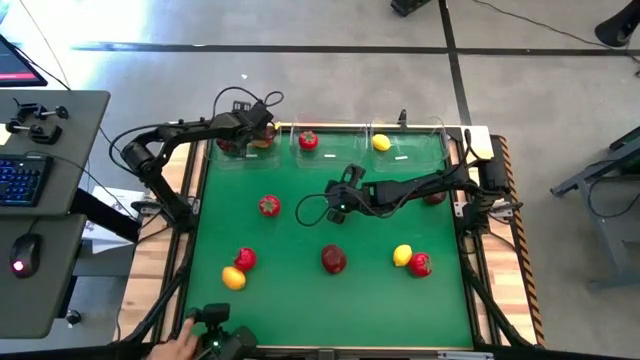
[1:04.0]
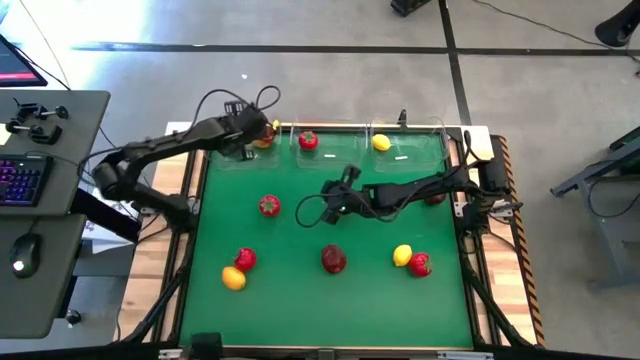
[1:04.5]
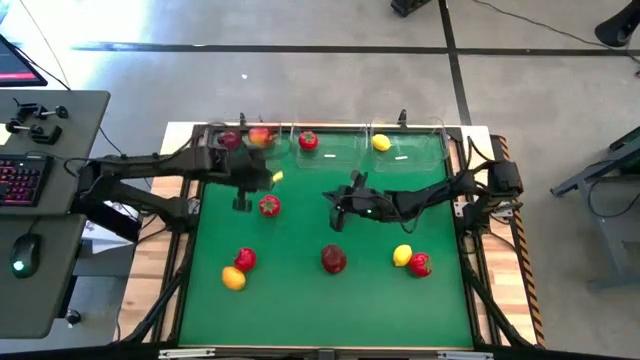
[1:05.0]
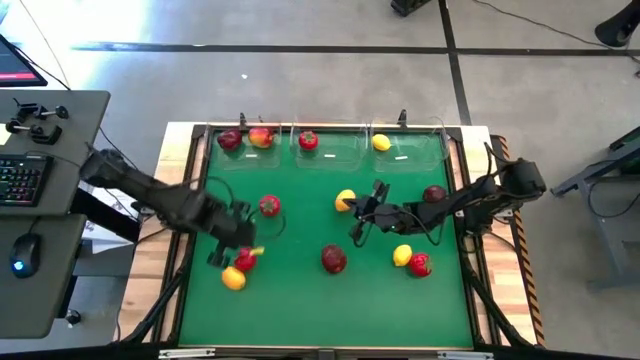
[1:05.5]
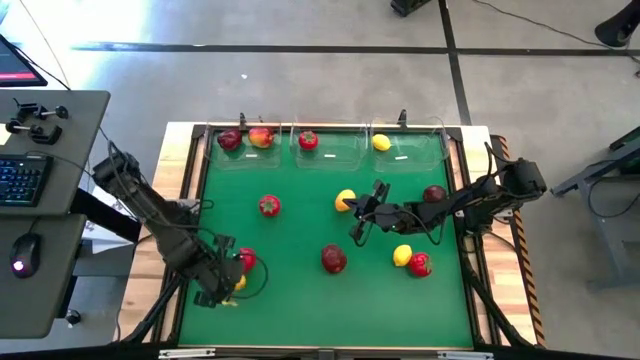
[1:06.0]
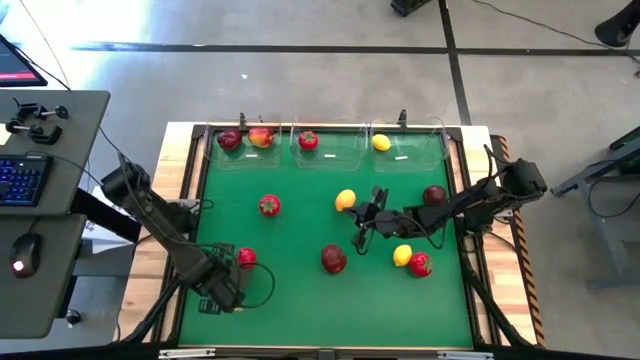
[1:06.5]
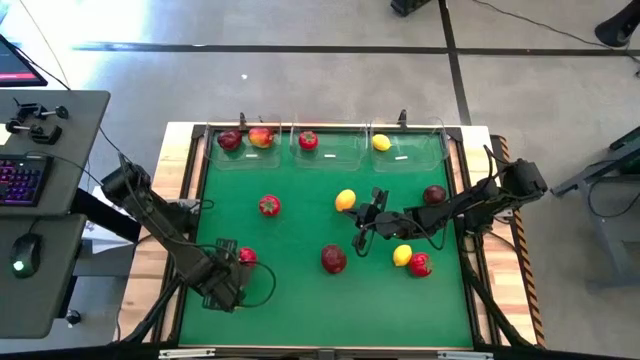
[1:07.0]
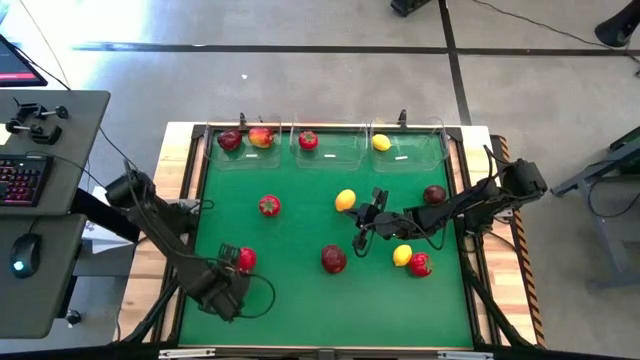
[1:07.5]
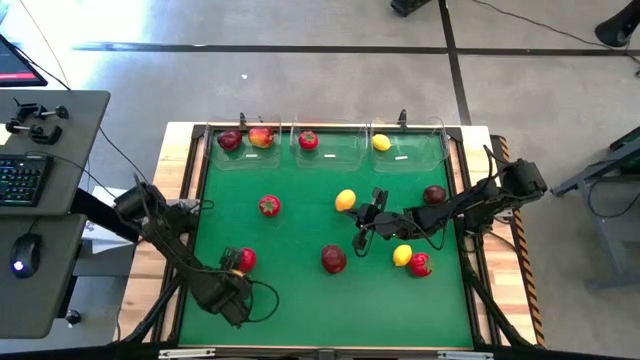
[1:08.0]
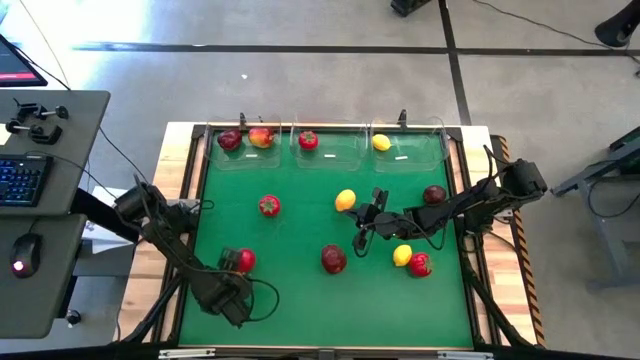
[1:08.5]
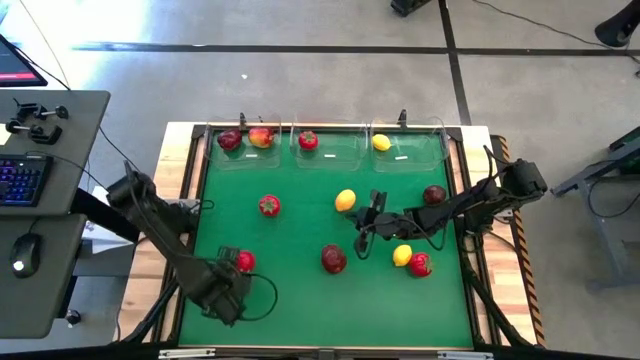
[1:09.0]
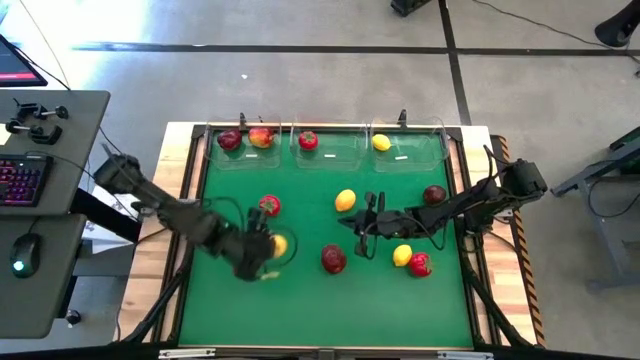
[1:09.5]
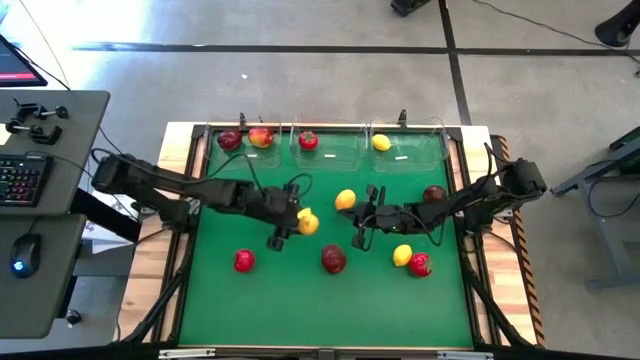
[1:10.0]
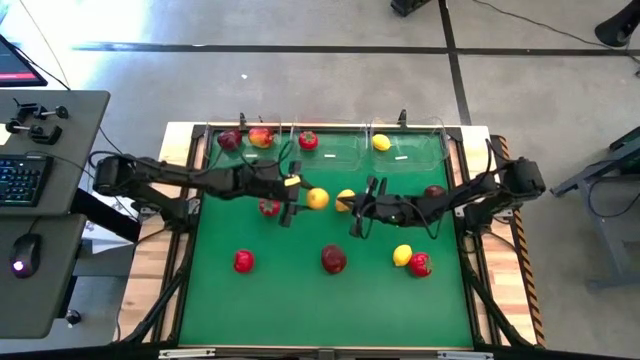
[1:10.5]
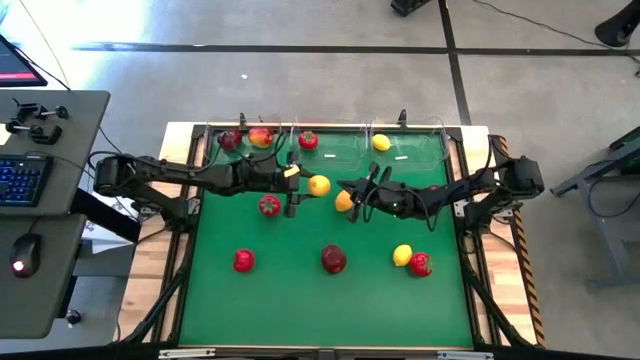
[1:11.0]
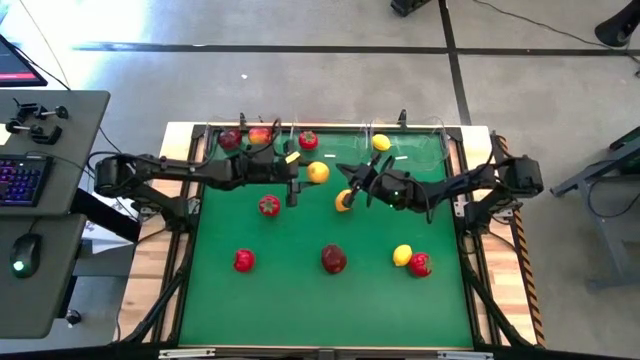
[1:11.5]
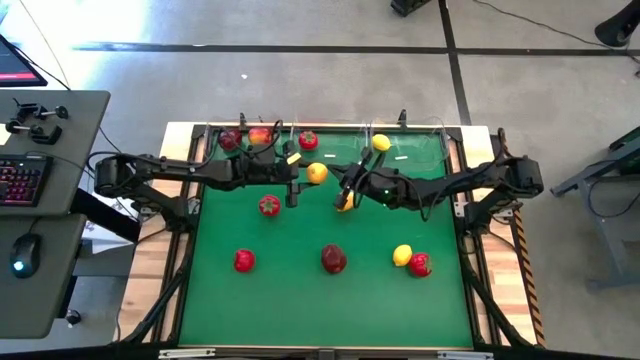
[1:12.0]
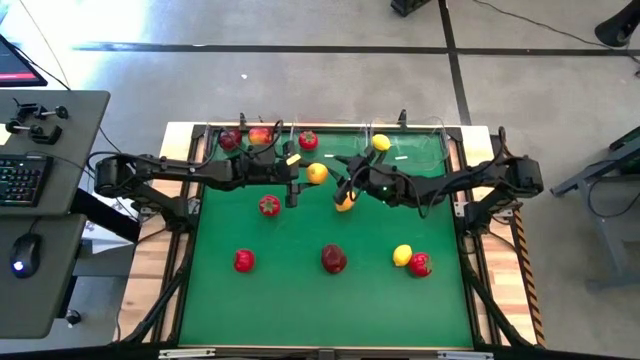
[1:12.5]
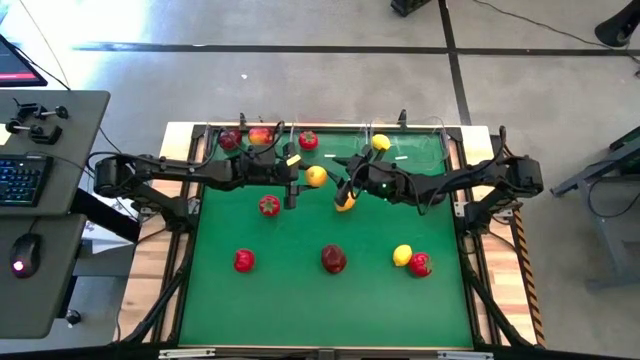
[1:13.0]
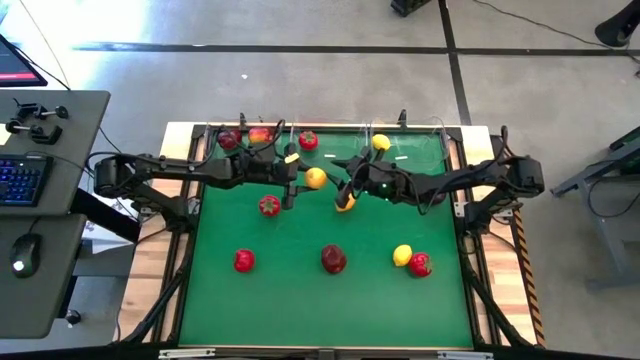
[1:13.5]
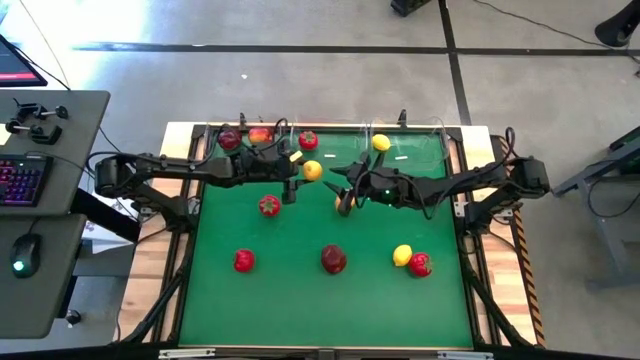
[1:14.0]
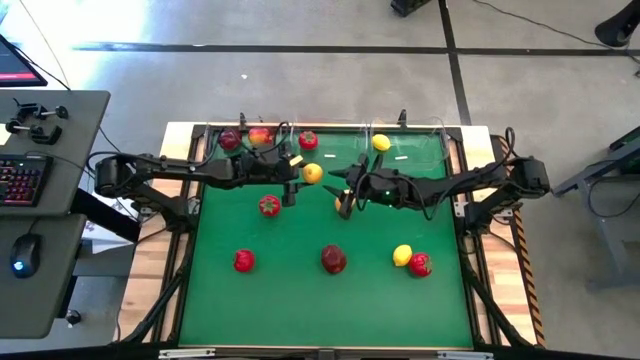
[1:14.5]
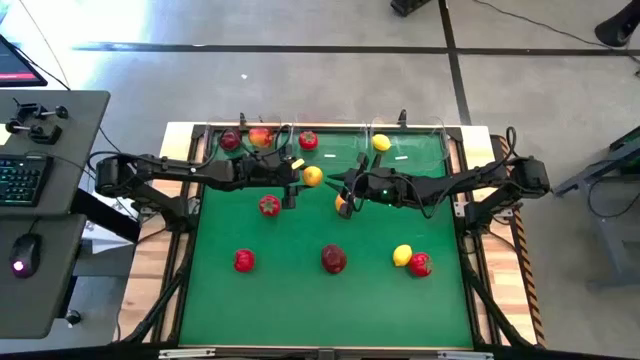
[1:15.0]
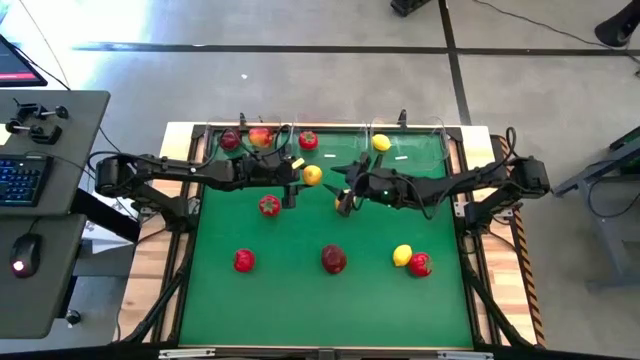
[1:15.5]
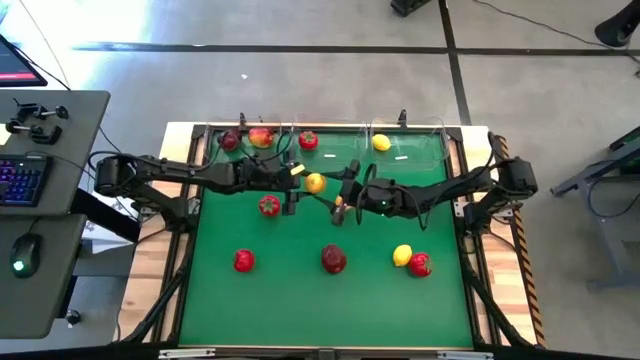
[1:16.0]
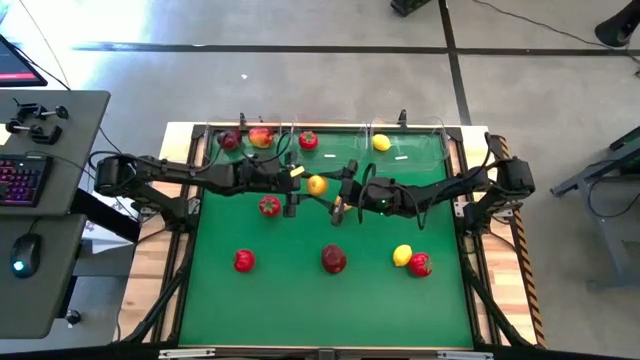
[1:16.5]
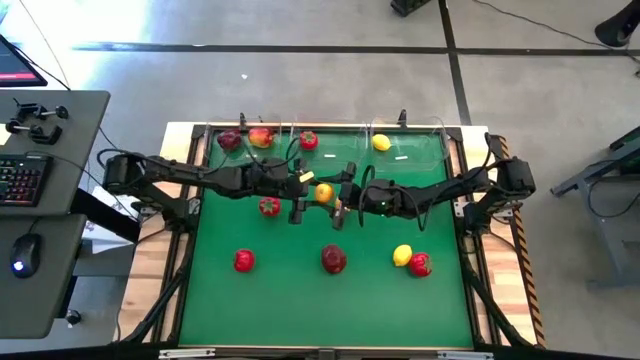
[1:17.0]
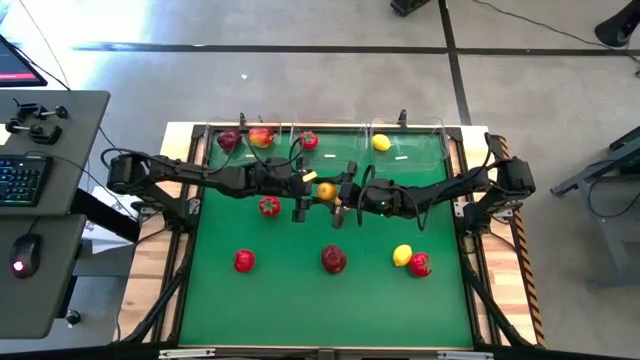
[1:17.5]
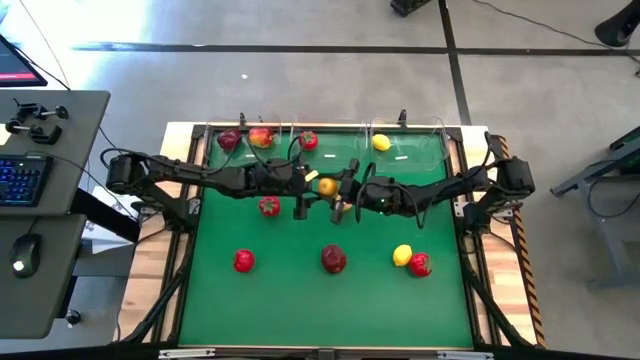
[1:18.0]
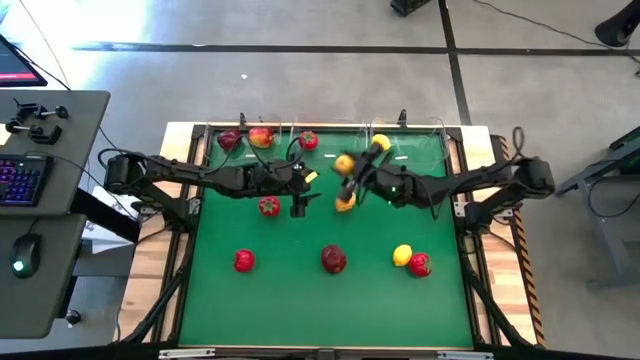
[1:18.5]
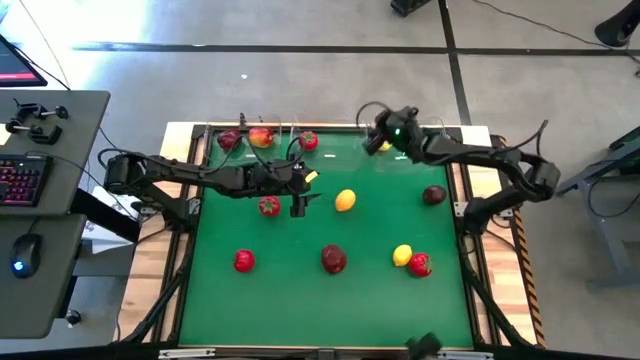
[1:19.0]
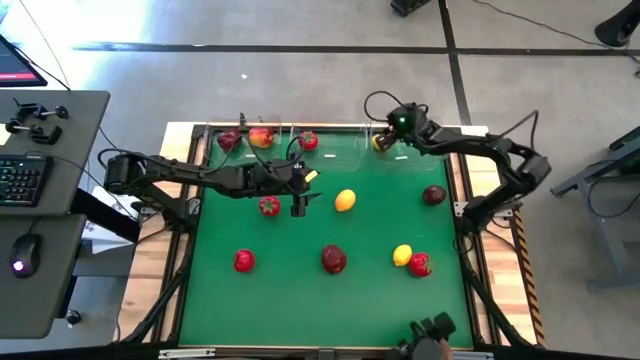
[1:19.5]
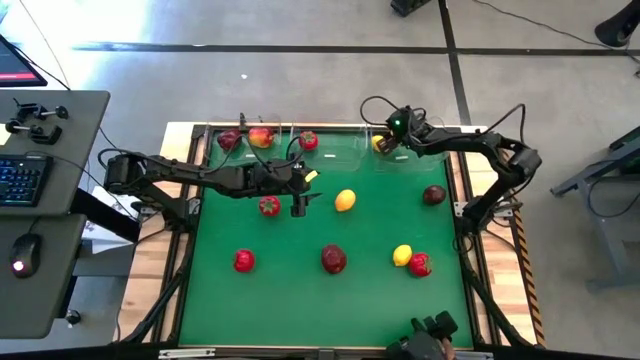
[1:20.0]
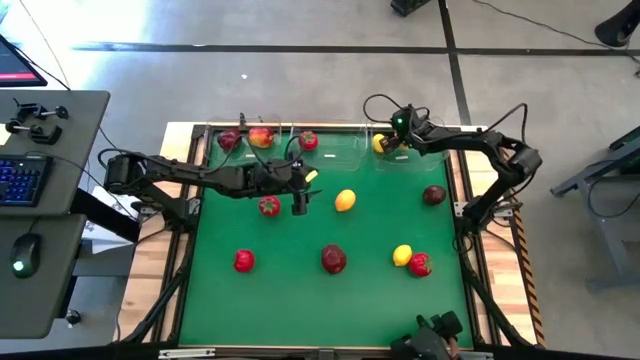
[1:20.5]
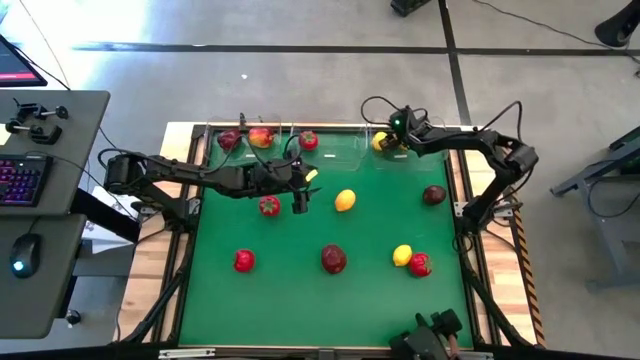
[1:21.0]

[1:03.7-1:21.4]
Task: Sort produce into baskets
Put the bottom left lemon into the right transparent bin

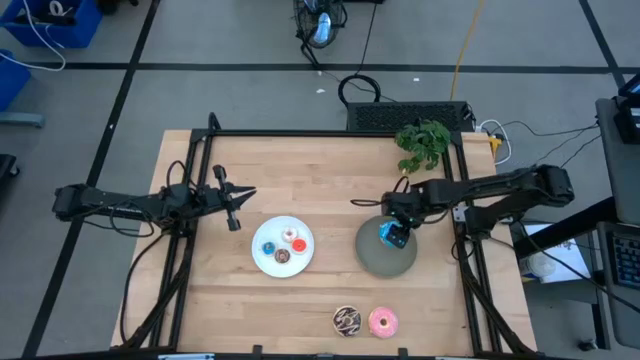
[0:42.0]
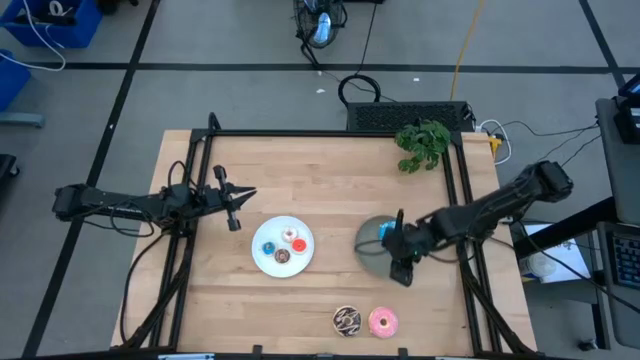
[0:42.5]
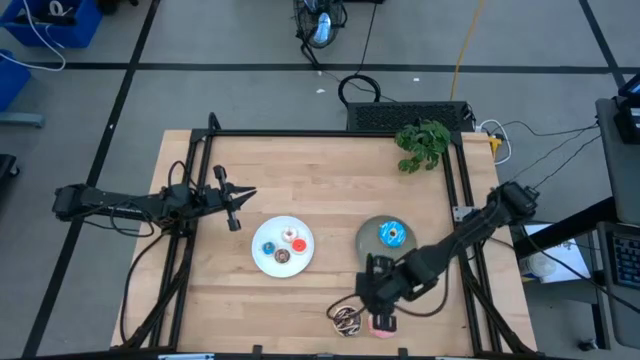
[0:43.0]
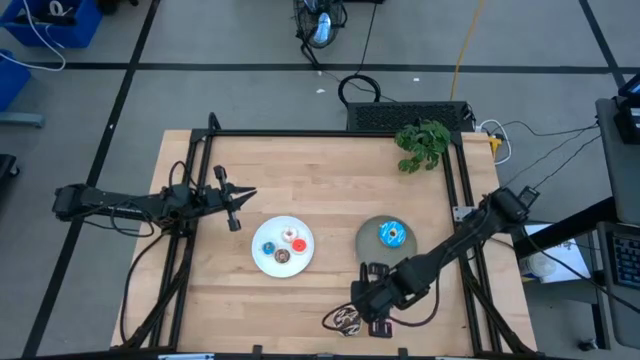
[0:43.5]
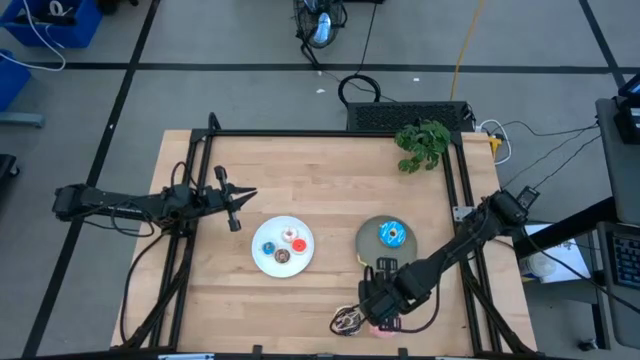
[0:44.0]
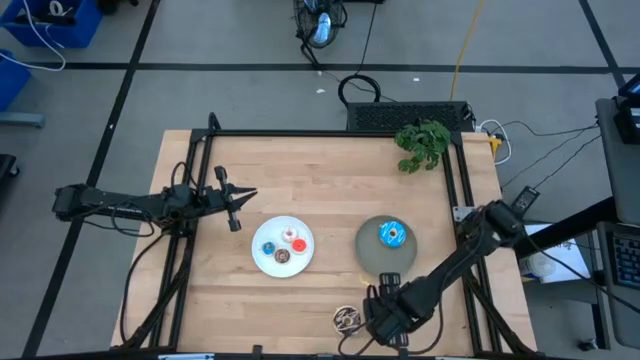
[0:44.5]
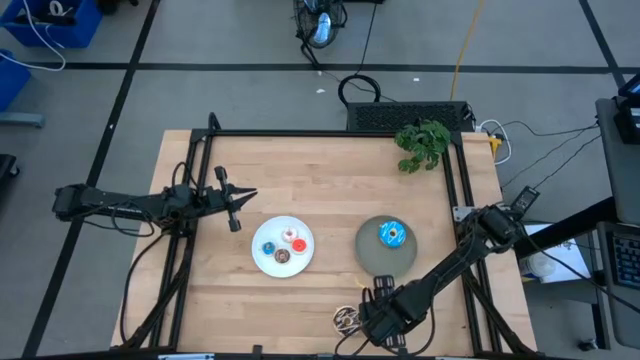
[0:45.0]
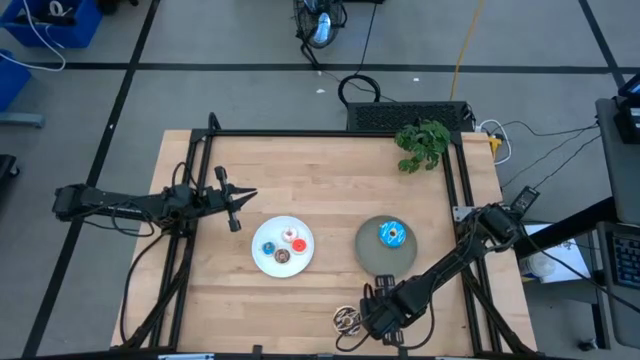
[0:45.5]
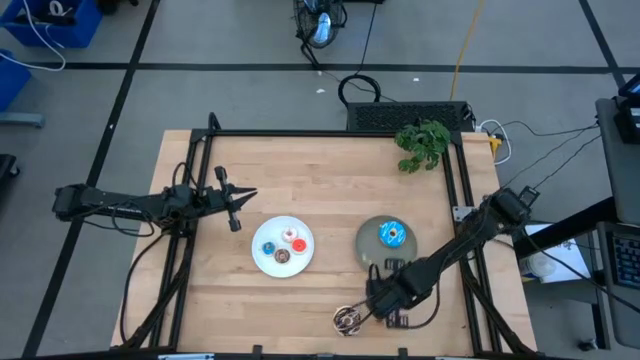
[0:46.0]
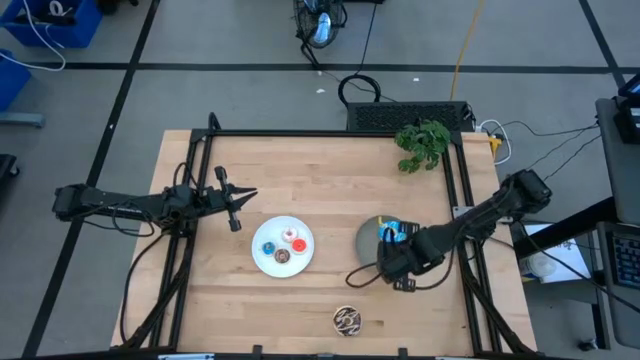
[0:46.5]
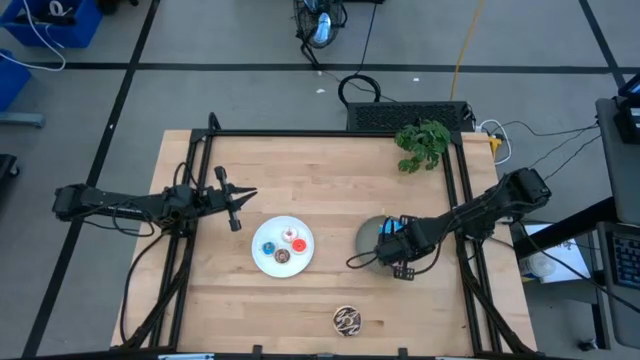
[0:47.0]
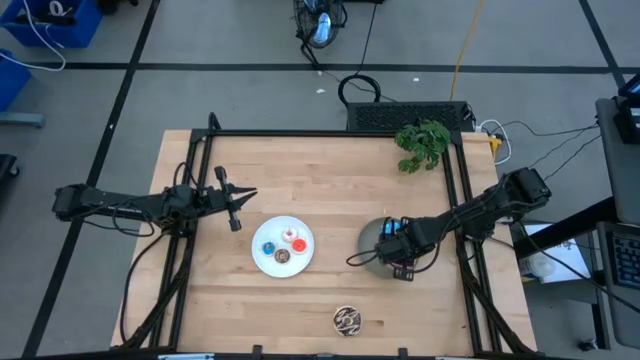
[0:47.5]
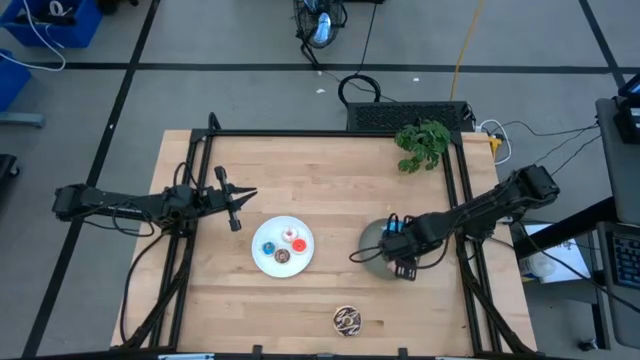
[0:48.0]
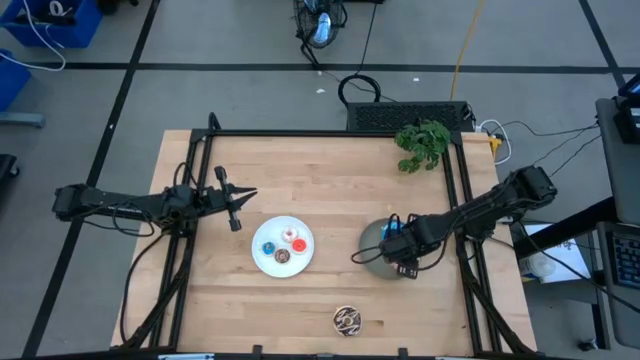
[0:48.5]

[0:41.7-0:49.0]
Task: Pick & Place donuts
Put the large pink donut on the gray plate
